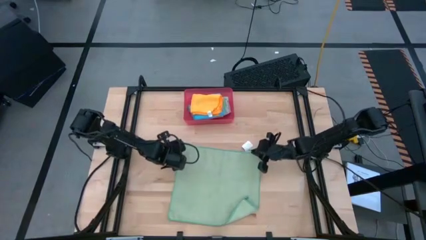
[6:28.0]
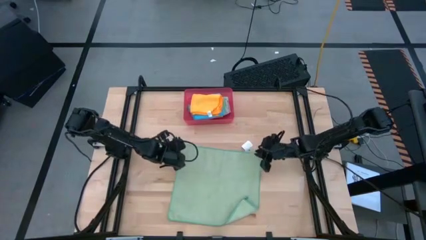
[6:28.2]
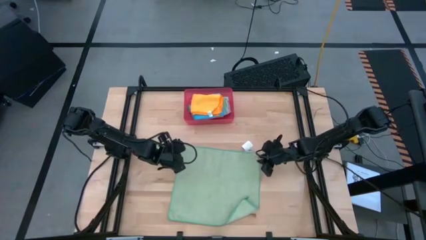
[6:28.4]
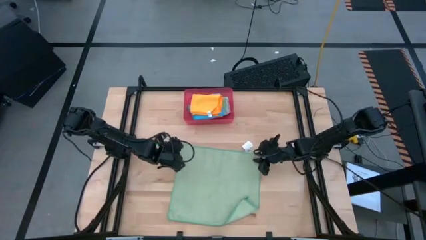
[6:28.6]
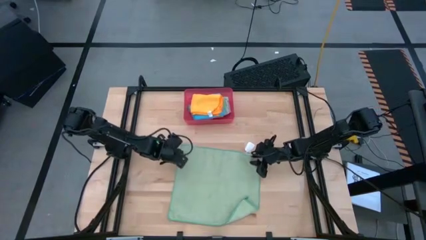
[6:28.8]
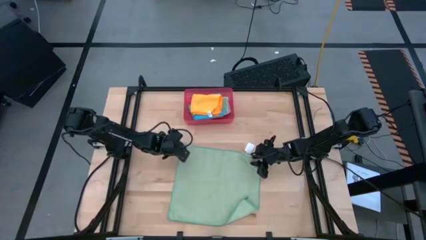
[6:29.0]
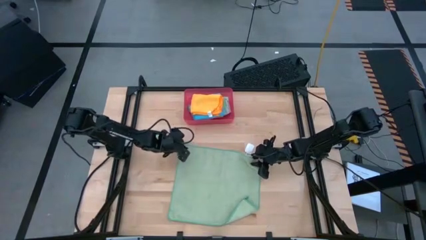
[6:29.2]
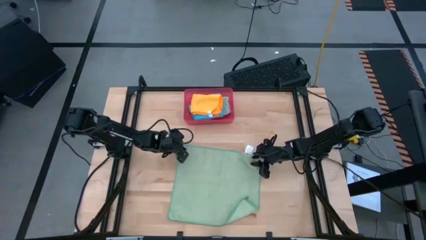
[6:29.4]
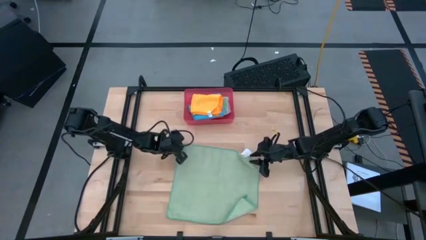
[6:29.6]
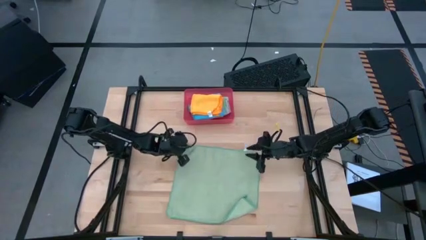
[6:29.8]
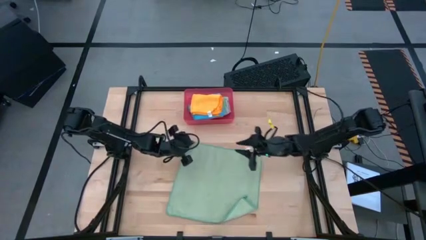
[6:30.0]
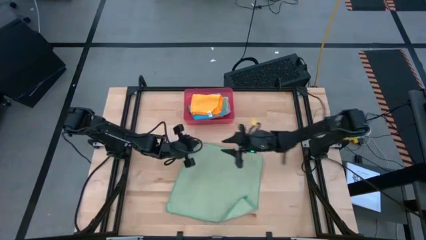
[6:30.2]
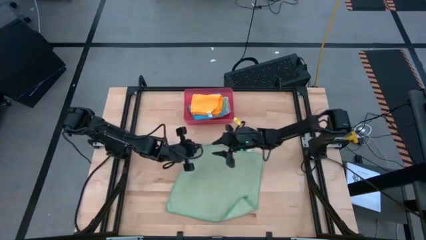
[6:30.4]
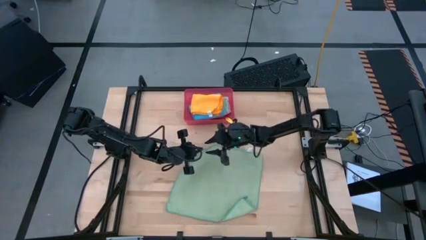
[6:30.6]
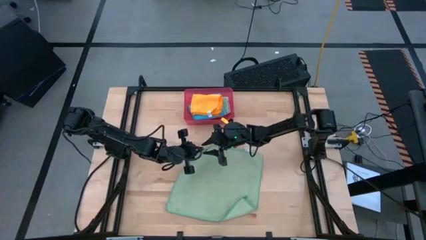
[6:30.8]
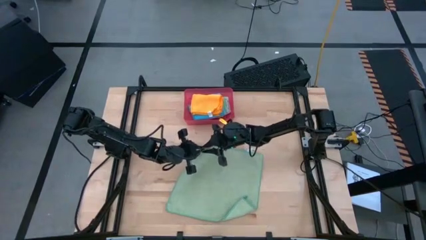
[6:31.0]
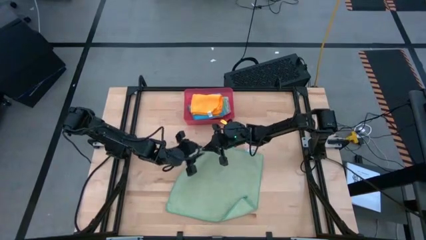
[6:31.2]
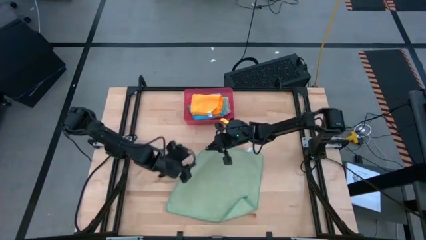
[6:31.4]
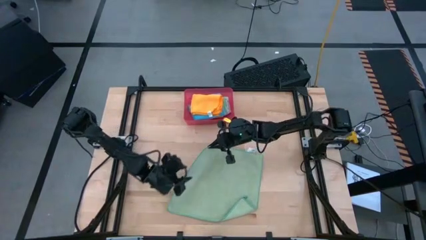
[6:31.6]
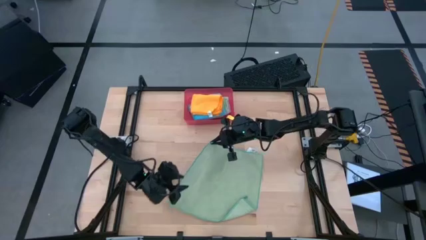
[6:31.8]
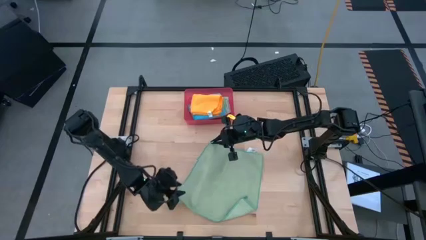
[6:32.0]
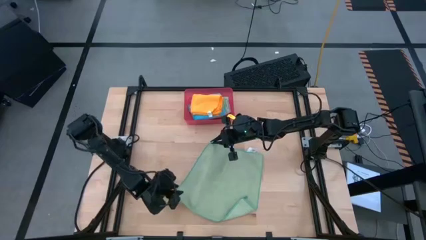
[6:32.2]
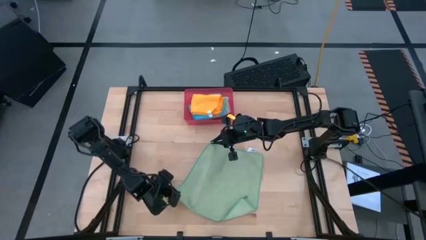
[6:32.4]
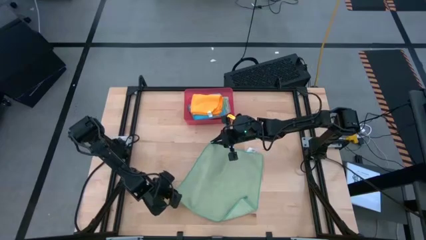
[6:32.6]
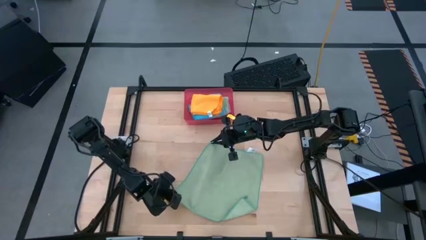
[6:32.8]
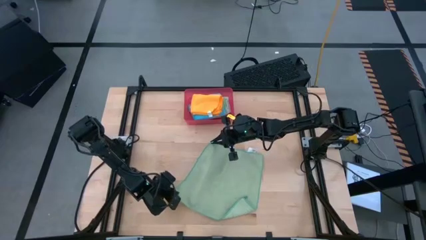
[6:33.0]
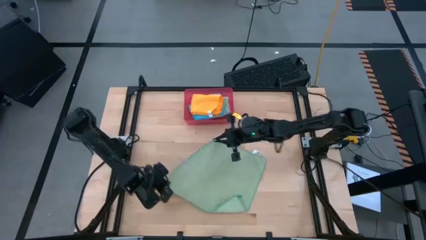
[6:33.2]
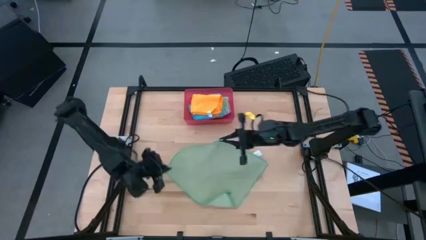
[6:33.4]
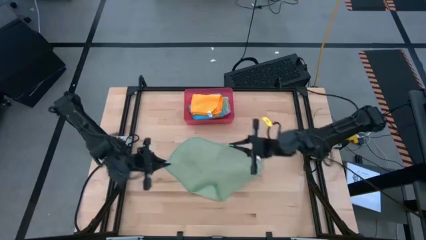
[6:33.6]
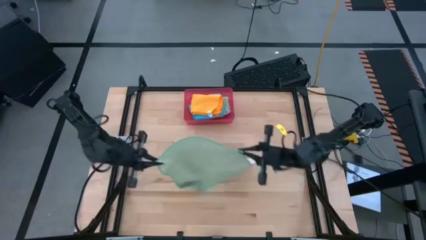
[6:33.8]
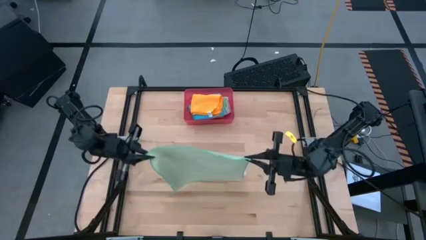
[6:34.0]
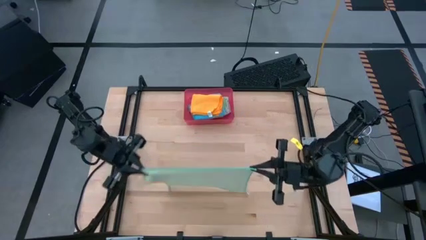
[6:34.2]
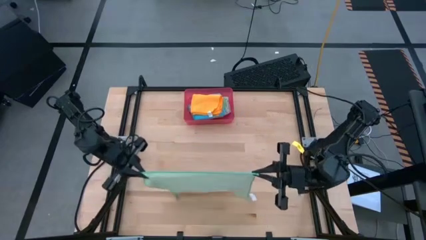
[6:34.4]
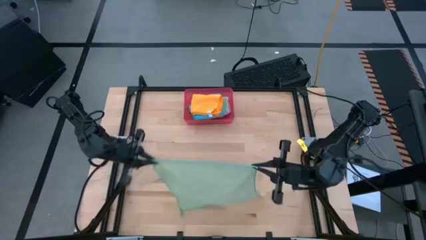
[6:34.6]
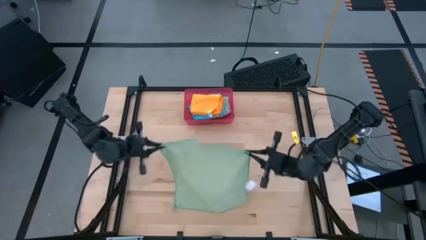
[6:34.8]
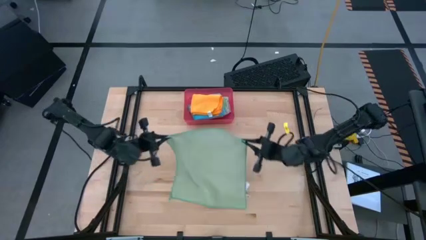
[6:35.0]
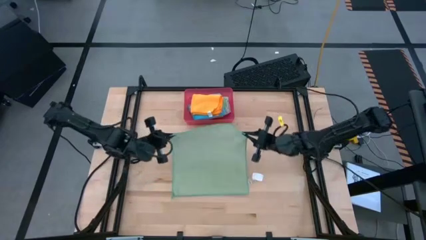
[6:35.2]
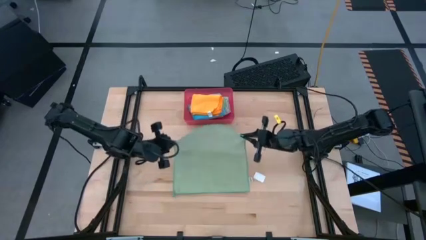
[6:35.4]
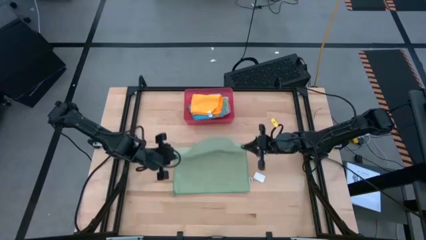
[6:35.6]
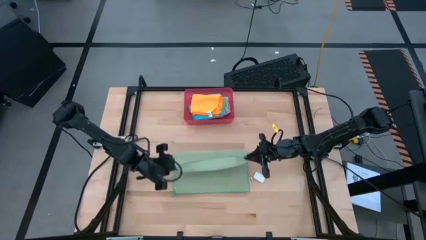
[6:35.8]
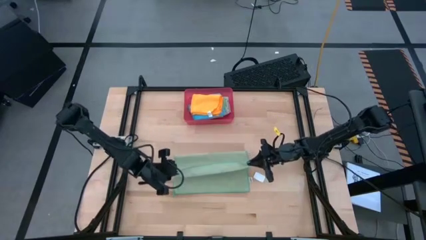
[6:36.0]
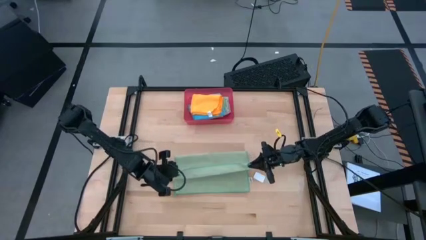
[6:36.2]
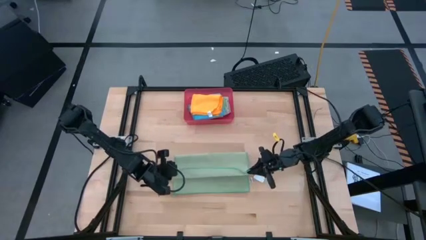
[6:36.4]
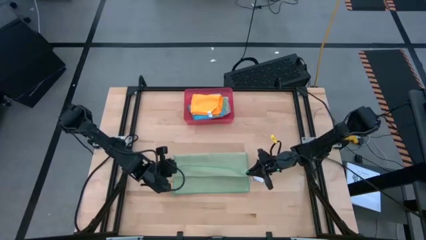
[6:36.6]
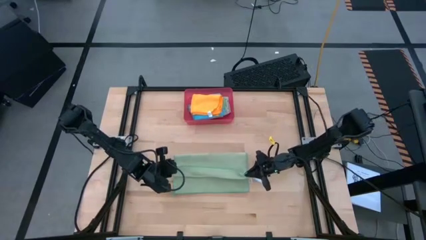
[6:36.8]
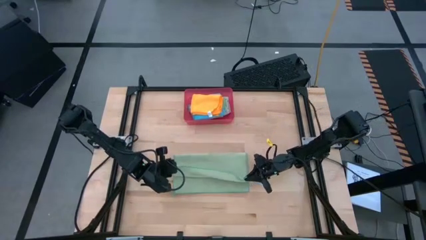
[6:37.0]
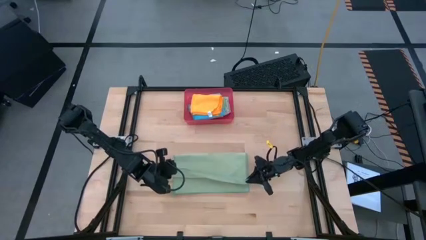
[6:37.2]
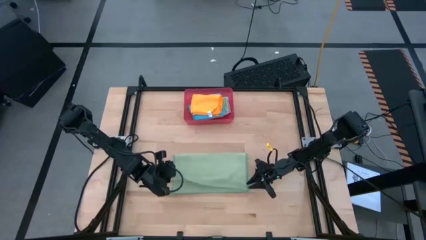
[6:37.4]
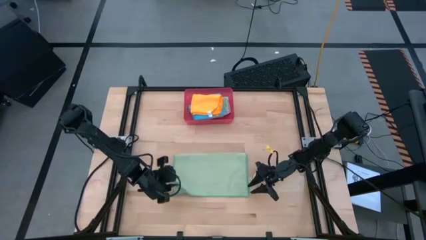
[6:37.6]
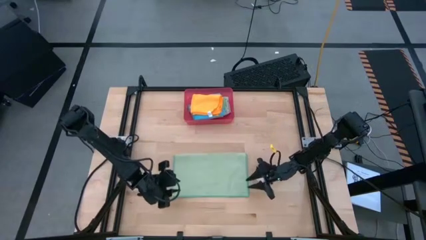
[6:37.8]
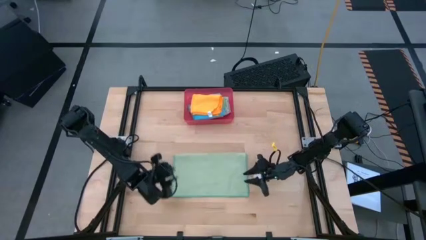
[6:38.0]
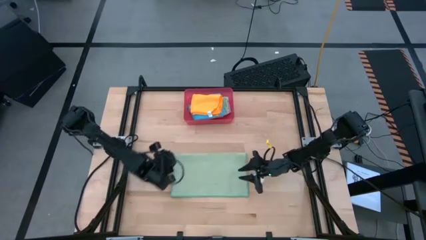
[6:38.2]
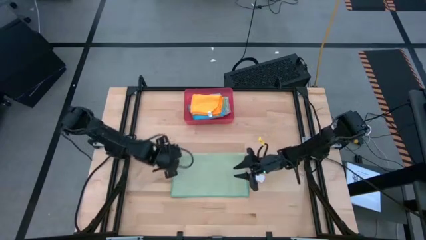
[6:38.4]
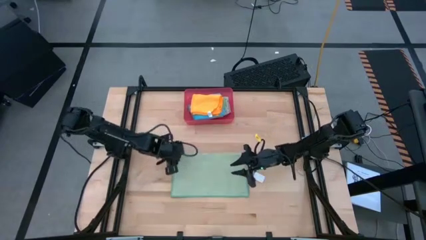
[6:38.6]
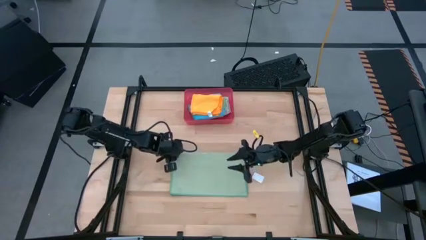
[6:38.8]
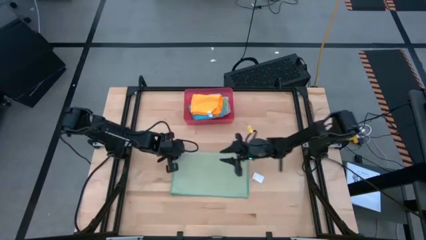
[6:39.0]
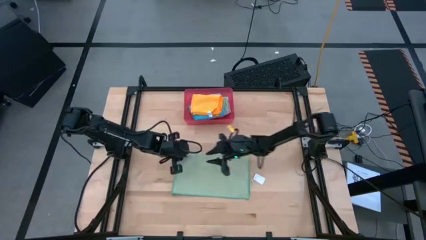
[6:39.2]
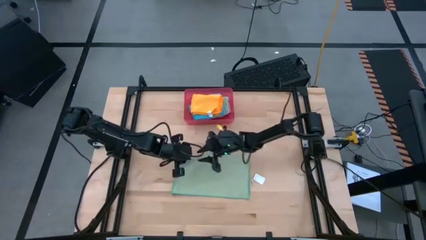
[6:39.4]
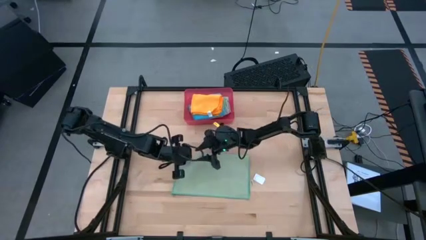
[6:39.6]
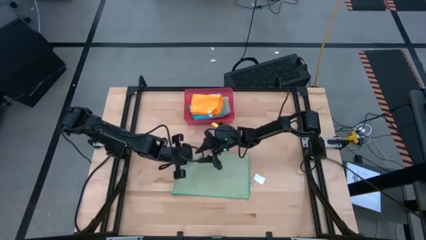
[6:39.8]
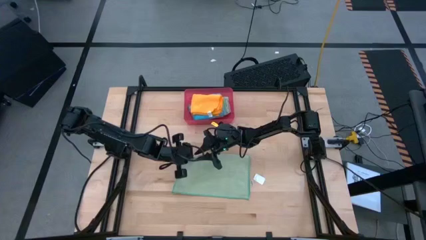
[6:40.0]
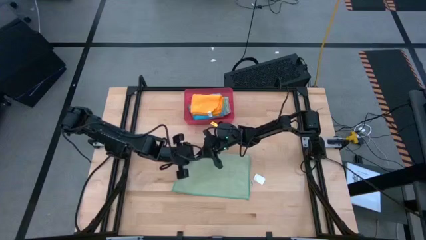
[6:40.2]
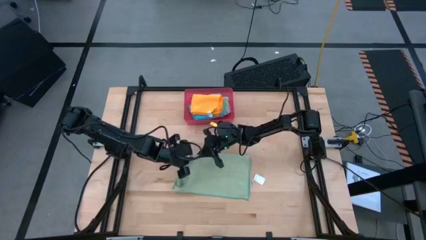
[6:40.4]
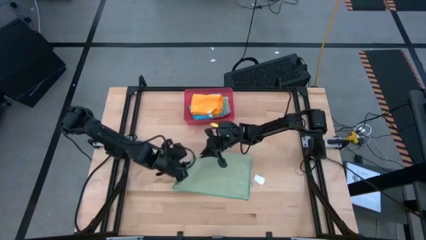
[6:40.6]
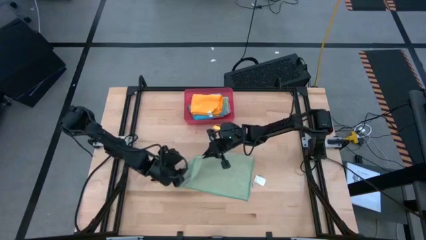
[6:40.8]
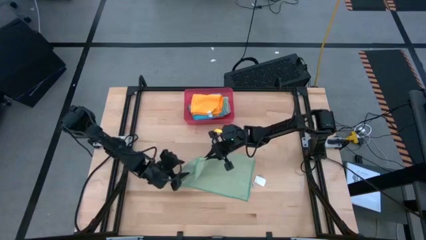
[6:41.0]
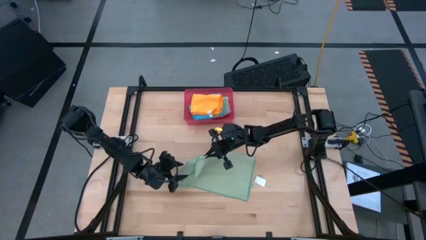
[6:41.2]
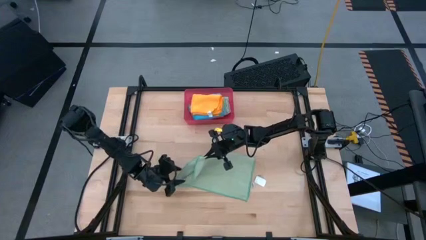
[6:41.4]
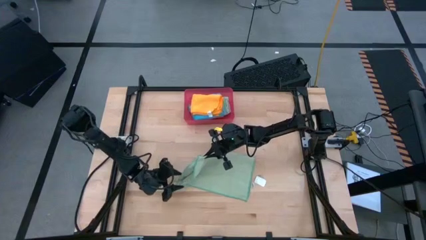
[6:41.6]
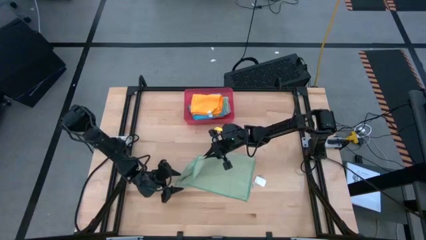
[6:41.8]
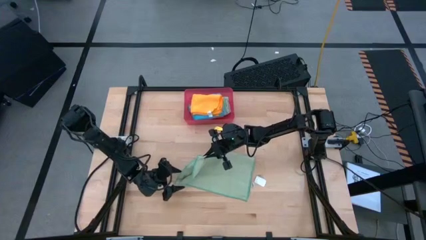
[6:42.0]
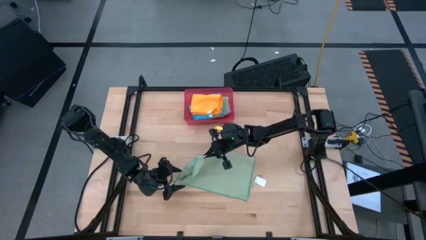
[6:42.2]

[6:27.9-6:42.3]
Task: Fold microfiber towels
Fold the light green towel
